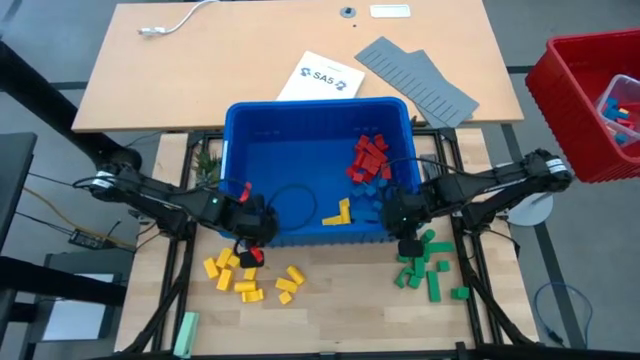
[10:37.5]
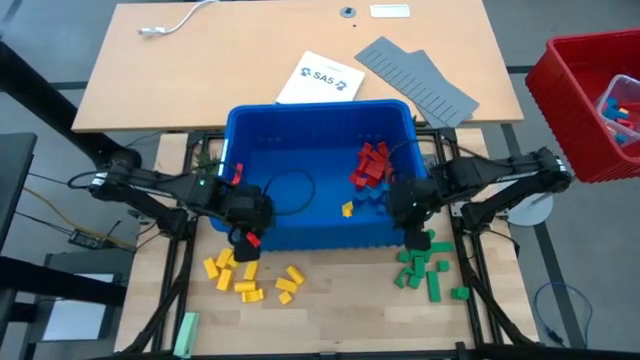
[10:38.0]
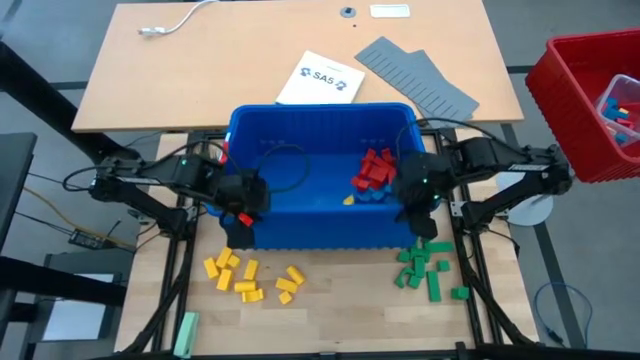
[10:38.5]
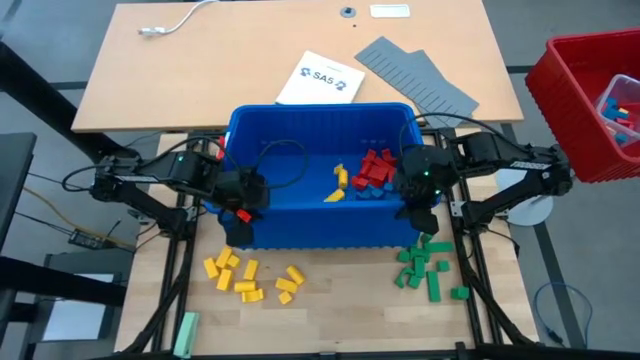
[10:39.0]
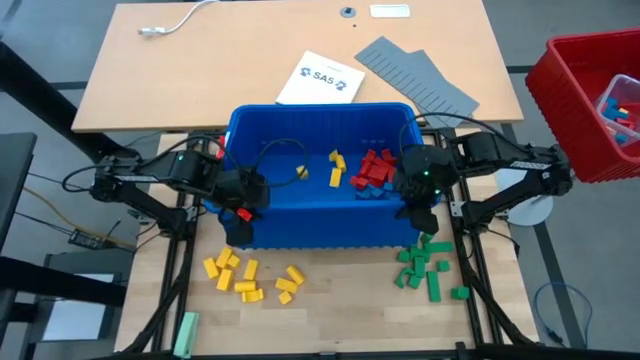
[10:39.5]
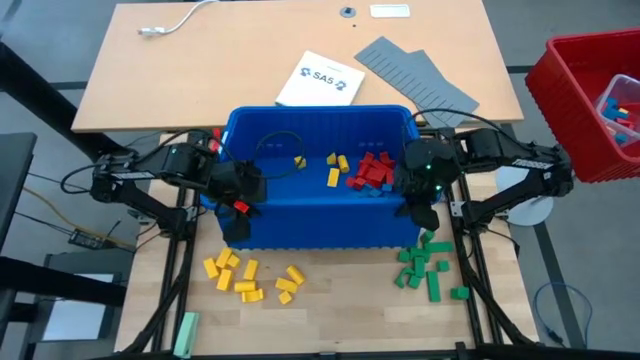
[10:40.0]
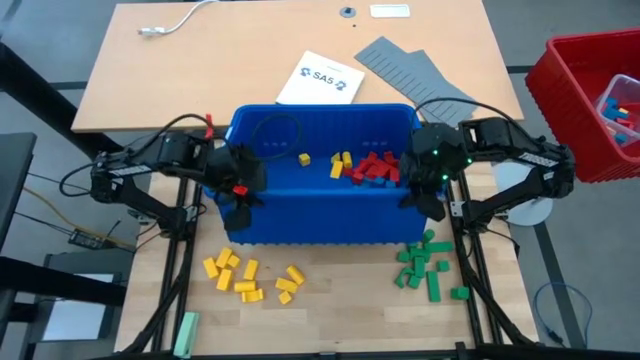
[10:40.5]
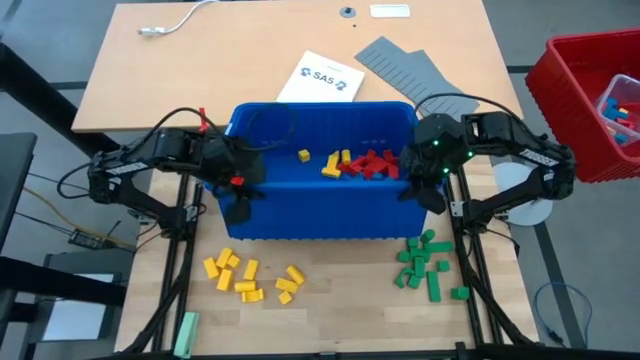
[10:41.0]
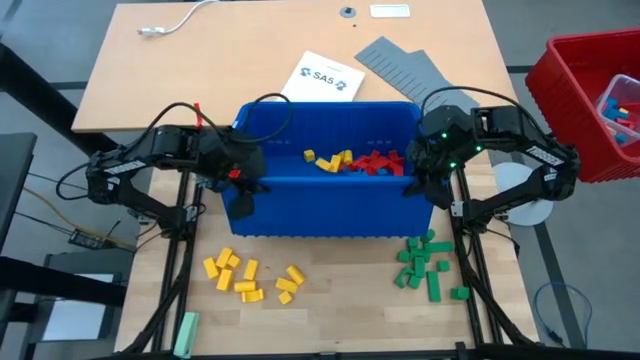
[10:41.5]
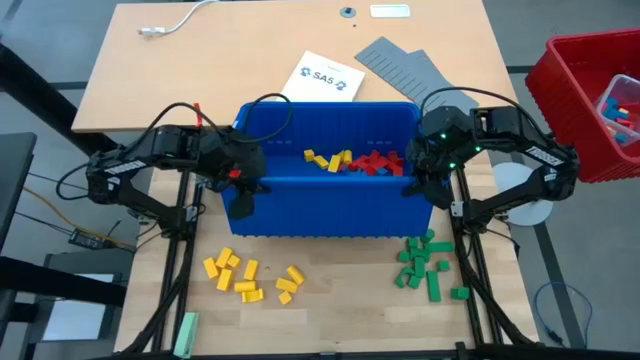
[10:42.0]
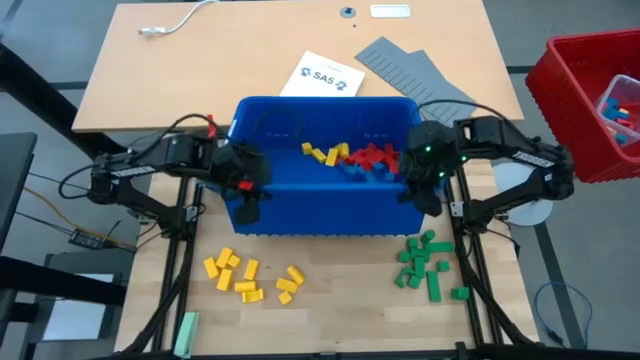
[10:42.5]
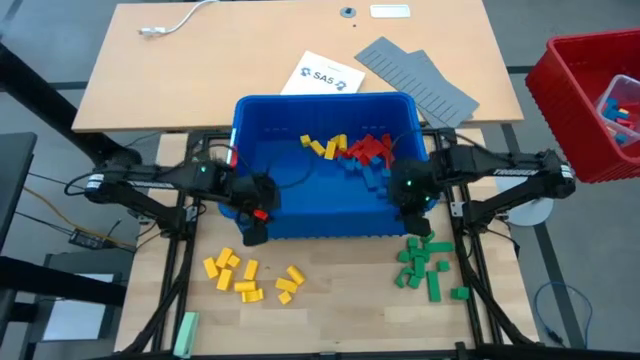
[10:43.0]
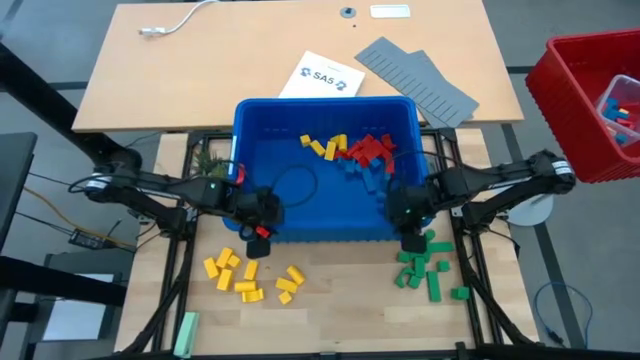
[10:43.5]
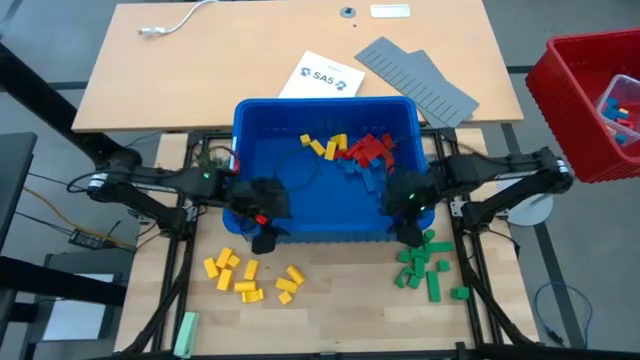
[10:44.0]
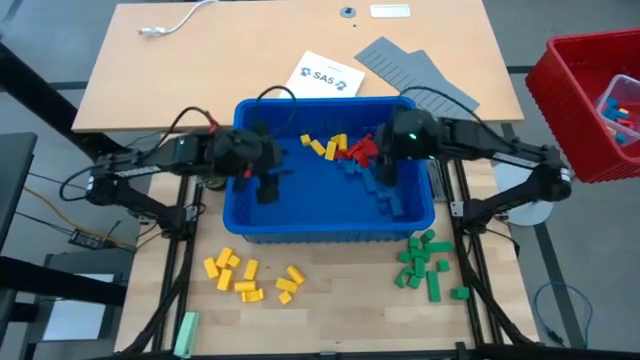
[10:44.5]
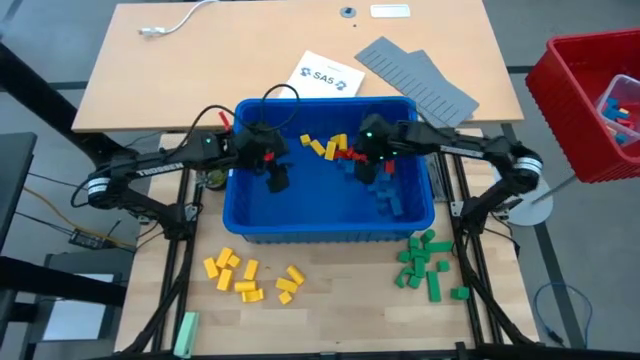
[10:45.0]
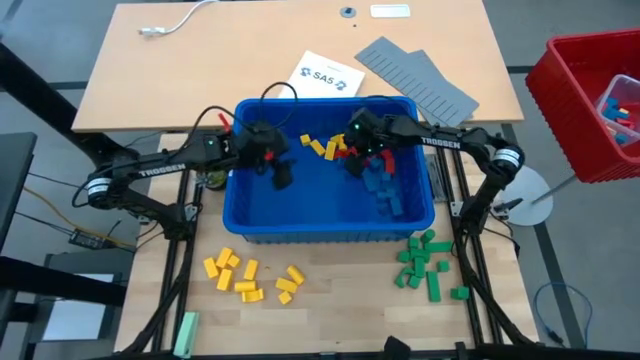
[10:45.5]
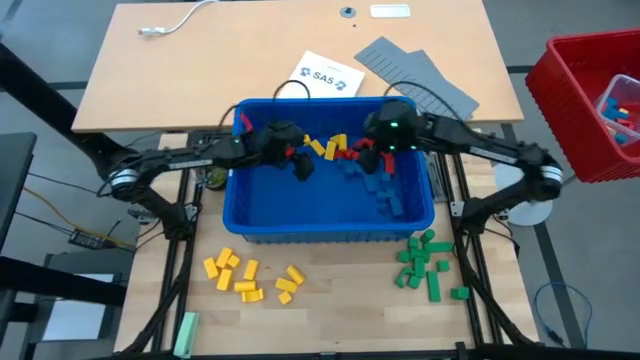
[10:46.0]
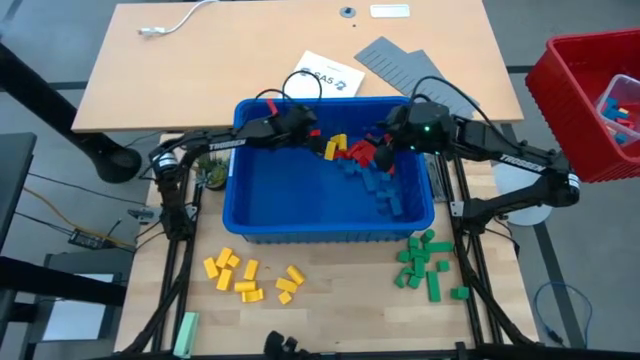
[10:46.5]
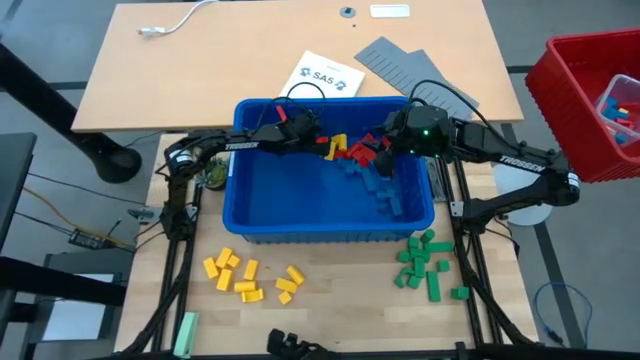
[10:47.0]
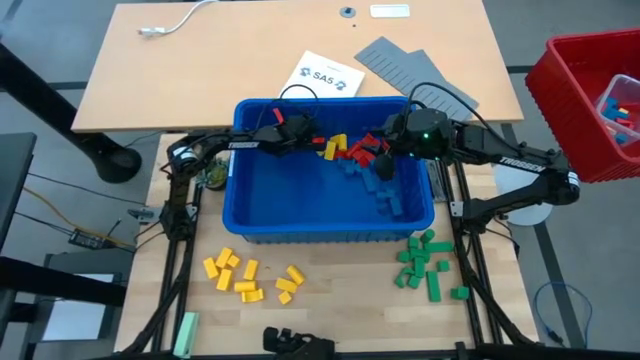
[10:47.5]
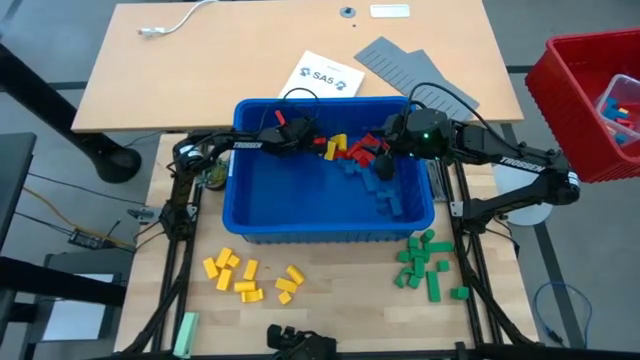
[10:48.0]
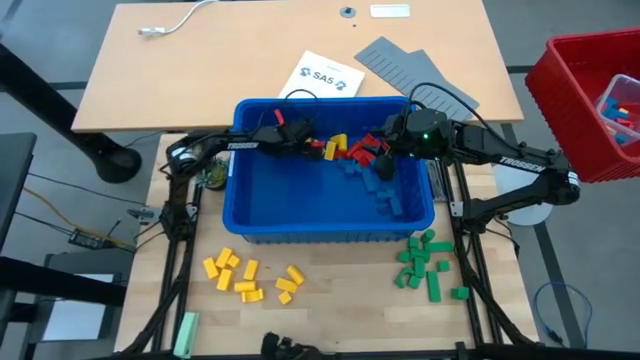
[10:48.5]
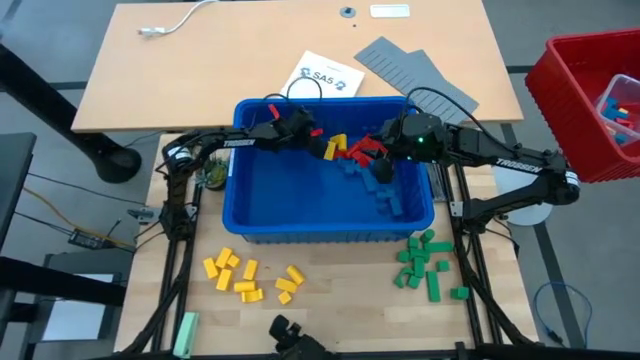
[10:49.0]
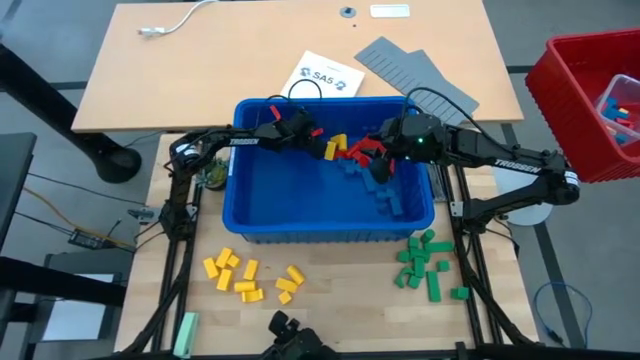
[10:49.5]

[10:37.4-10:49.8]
Task: Sort blocks
Adjust the blue bin

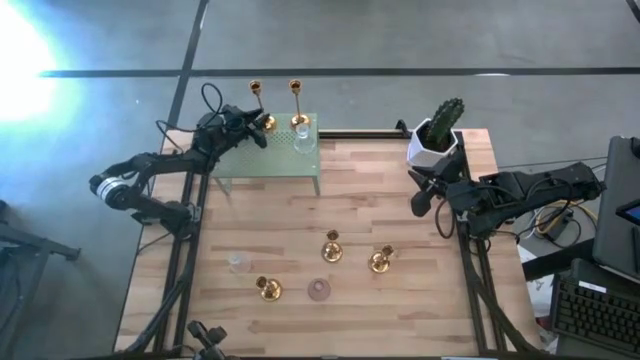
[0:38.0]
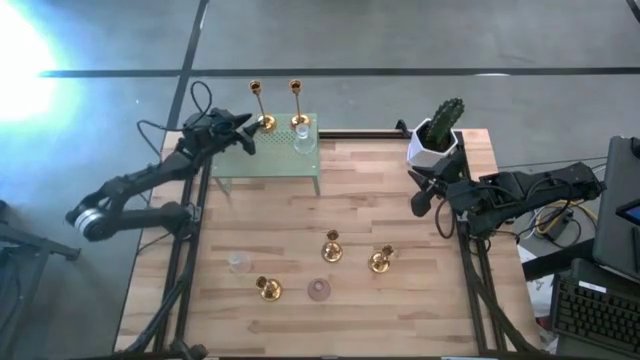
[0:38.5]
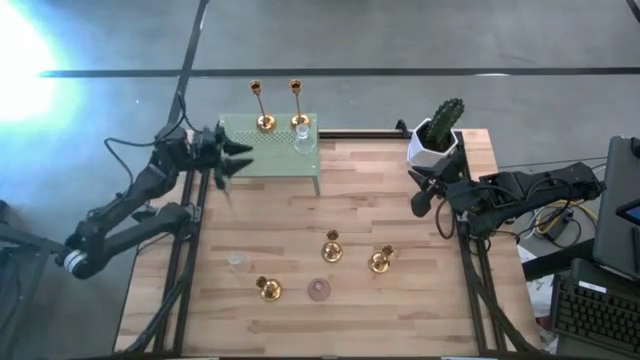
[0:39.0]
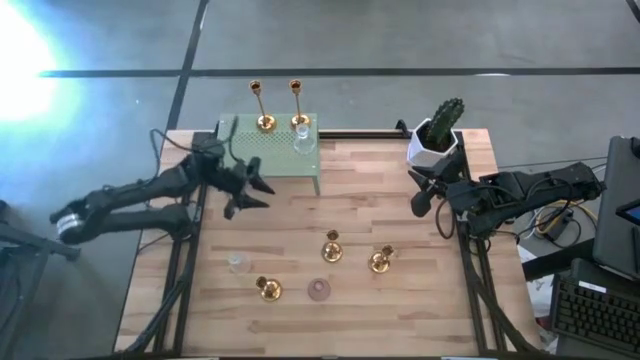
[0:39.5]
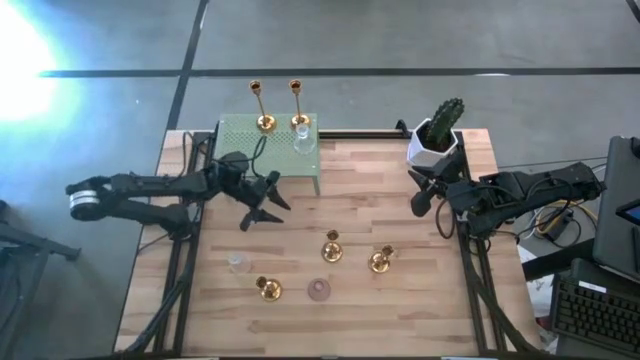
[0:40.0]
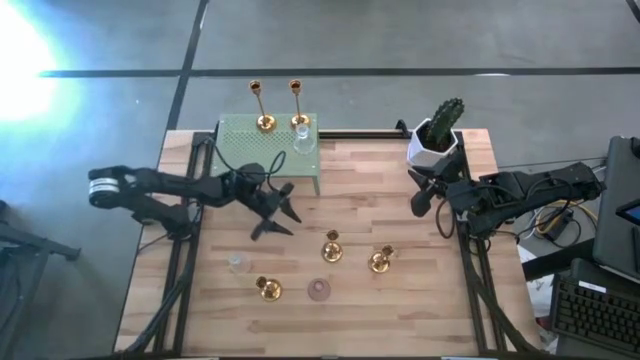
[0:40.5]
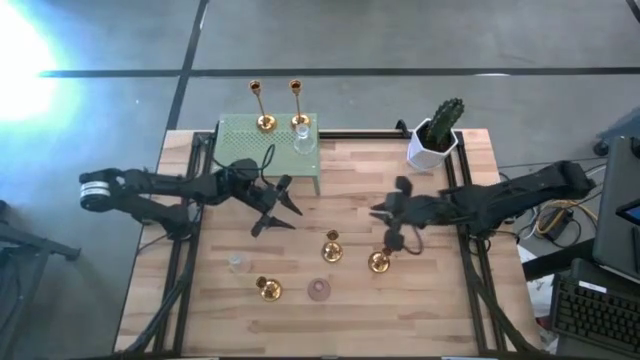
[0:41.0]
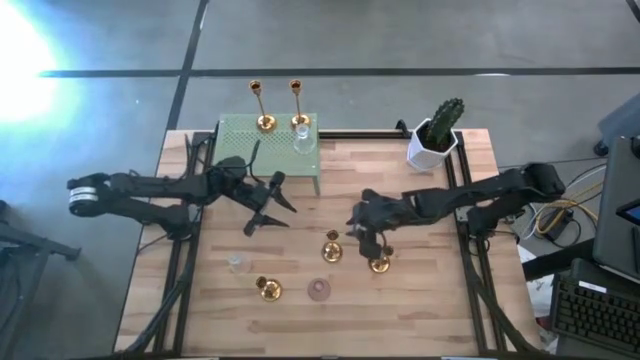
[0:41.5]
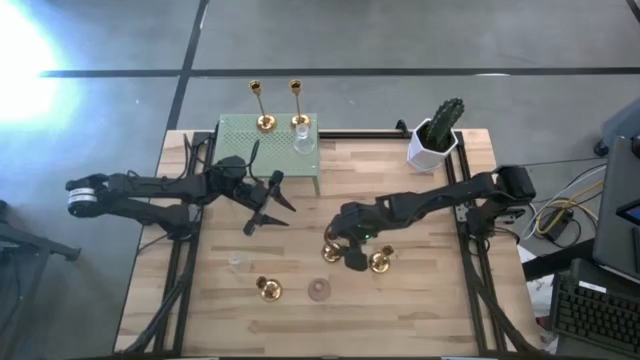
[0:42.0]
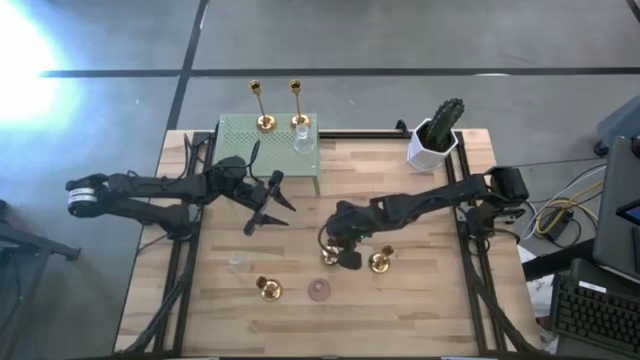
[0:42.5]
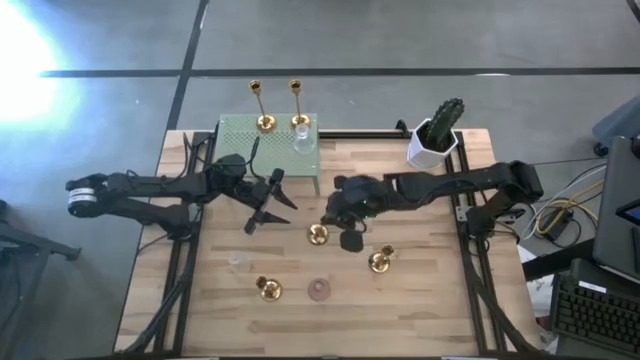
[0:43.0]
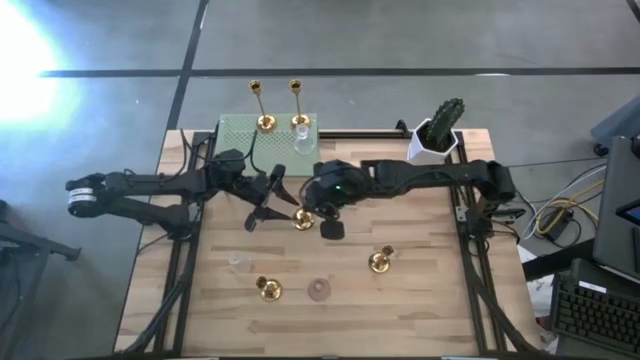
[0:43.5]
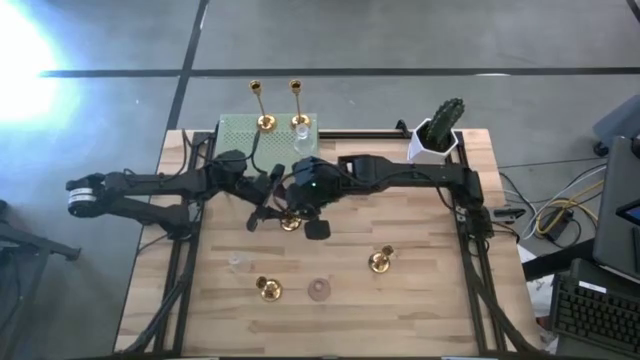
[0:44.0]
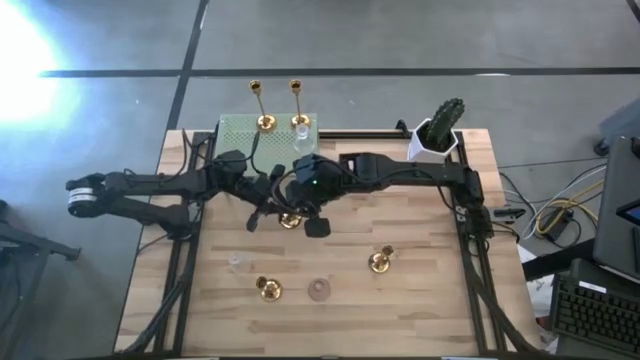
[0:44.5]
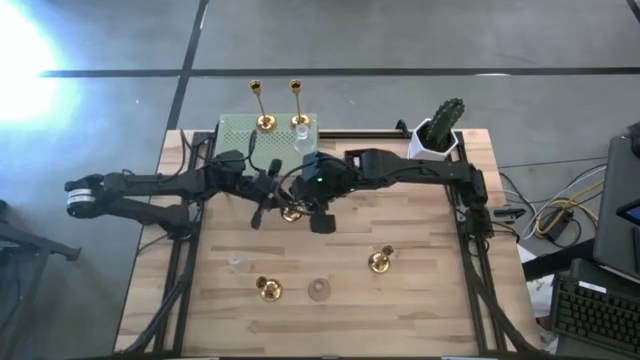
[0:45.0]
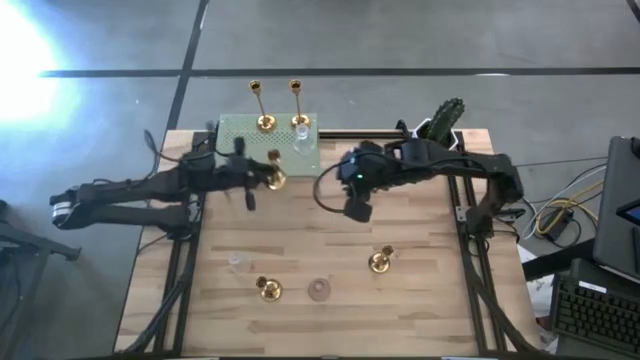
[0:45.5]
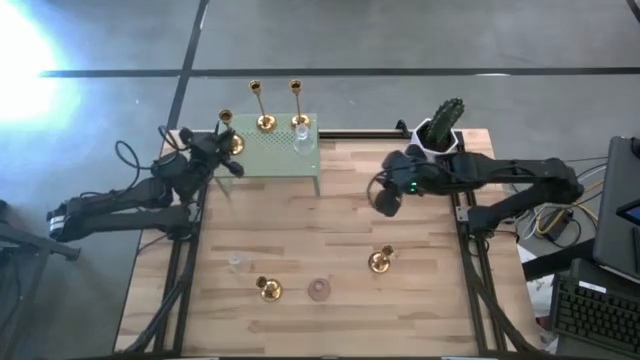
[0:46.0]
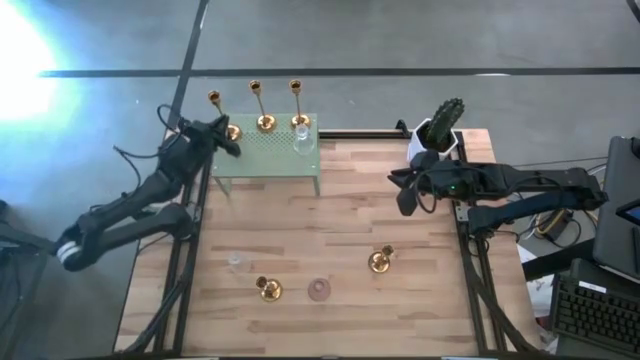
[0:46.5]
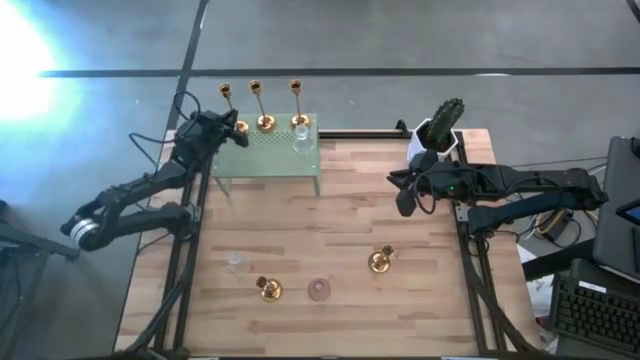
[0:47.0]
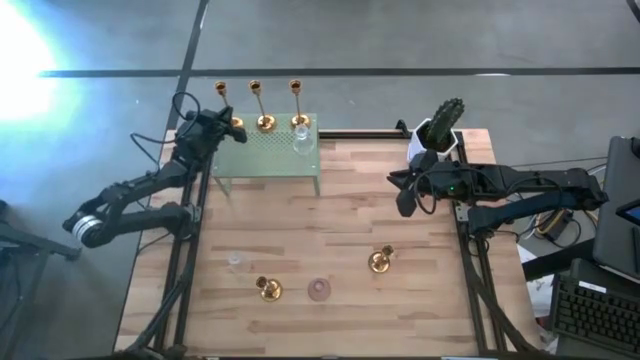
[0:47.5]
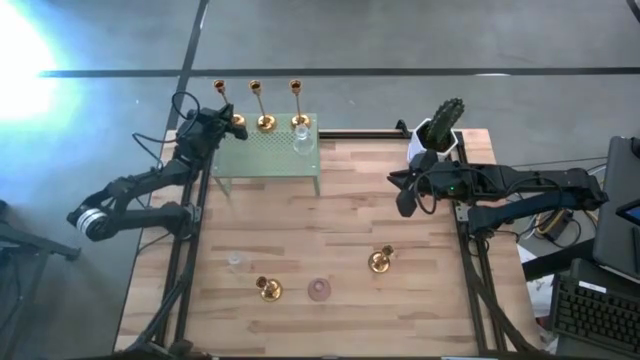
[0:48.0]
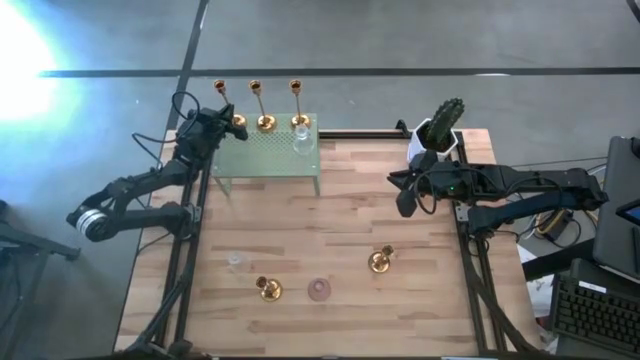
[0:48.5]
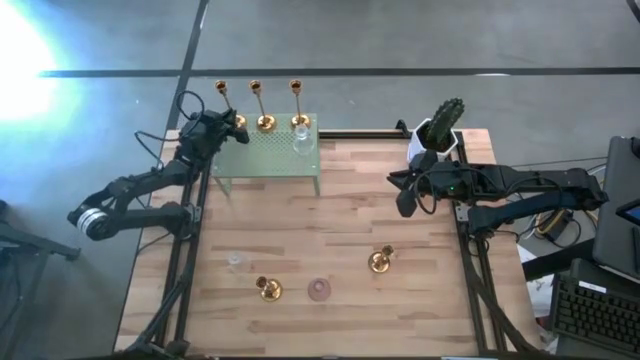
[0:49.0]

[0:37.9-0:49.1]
Task: Pick & Place candle stick holders
Put the golden candle holder on the shelf
